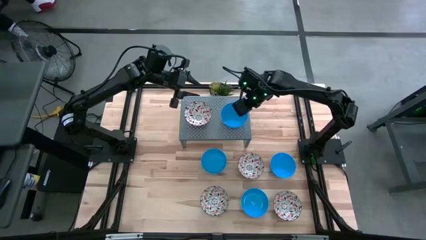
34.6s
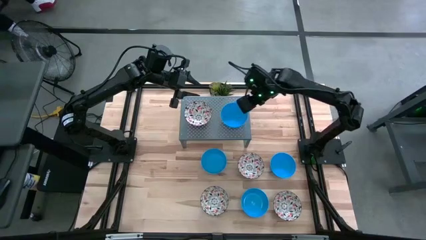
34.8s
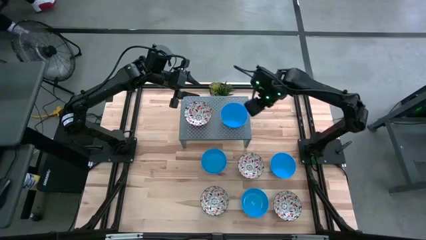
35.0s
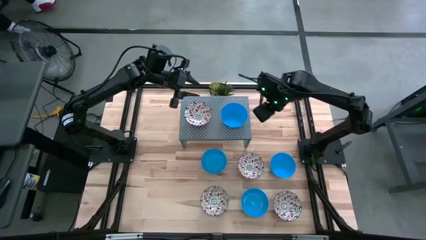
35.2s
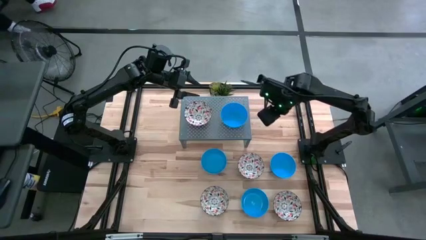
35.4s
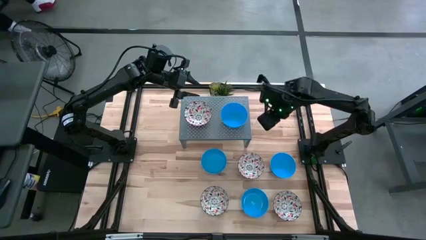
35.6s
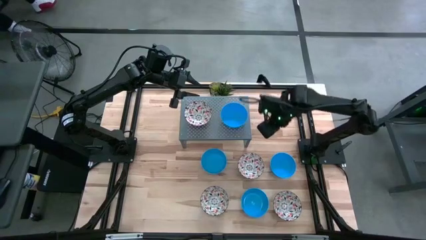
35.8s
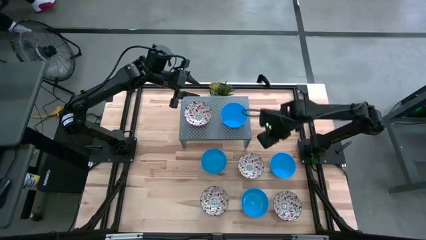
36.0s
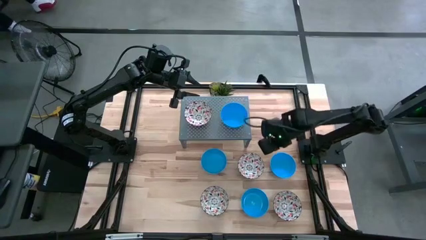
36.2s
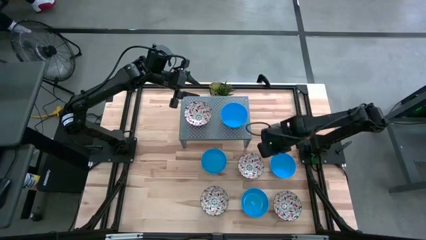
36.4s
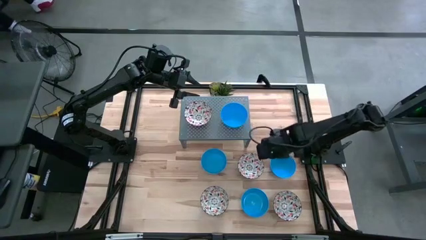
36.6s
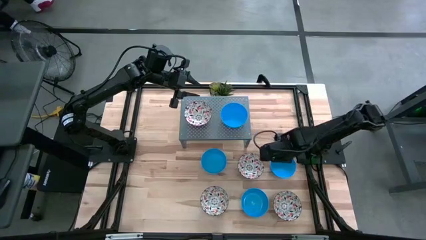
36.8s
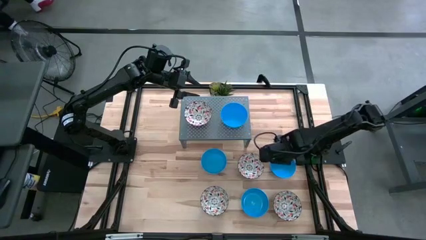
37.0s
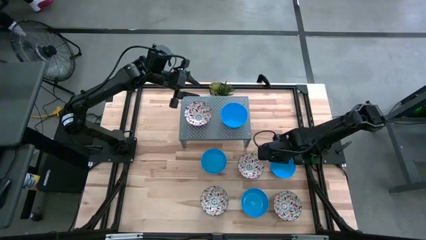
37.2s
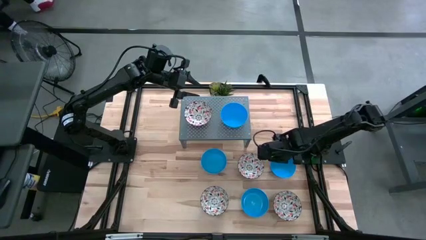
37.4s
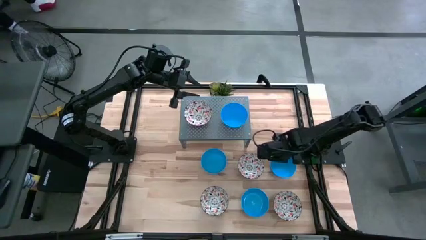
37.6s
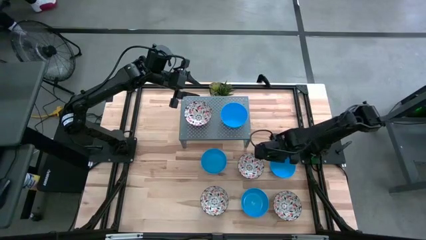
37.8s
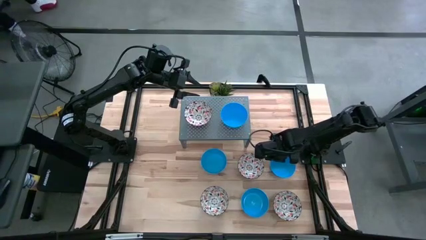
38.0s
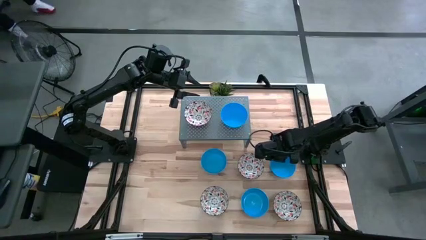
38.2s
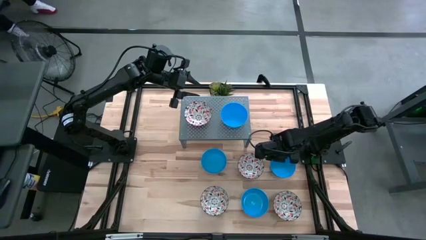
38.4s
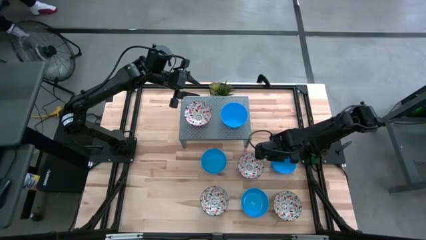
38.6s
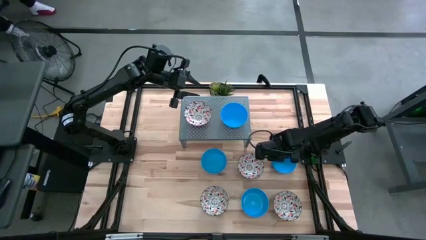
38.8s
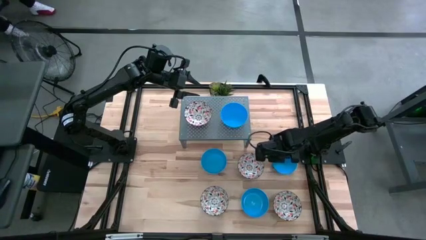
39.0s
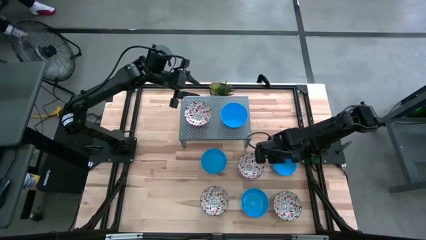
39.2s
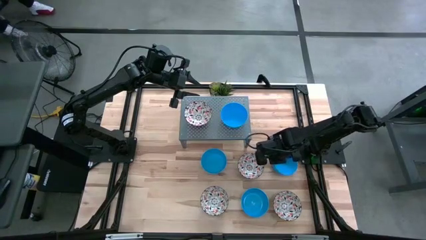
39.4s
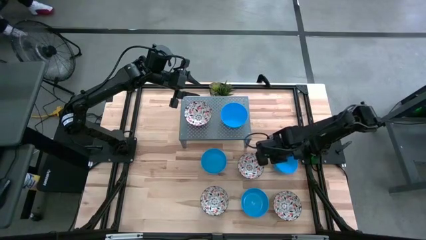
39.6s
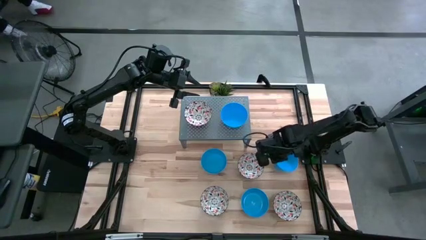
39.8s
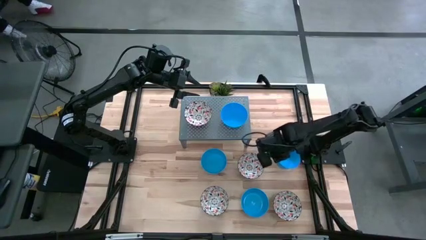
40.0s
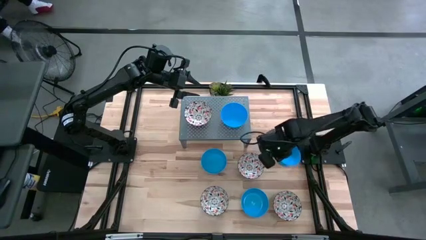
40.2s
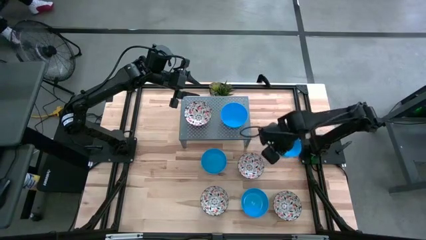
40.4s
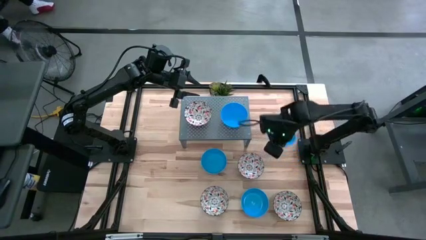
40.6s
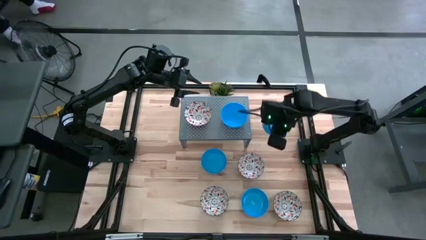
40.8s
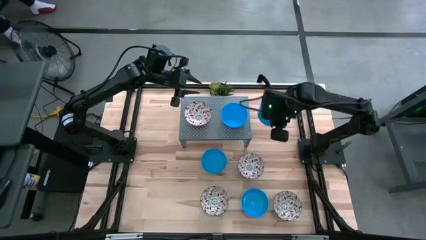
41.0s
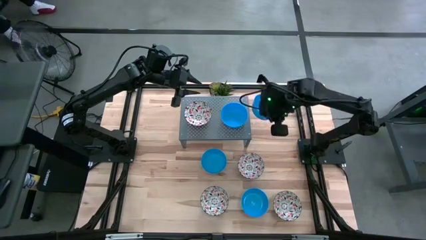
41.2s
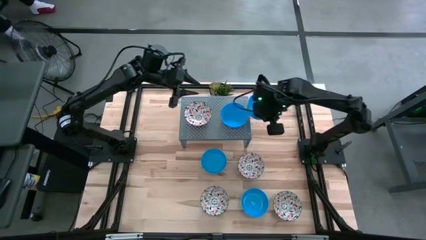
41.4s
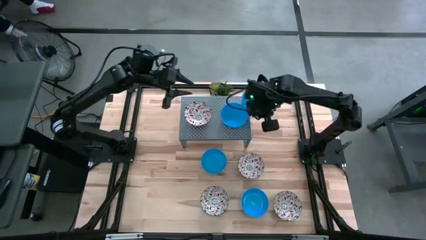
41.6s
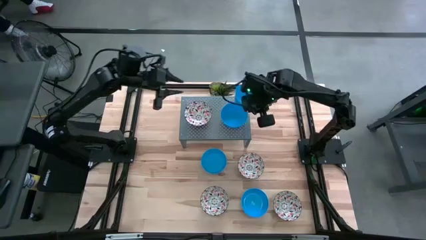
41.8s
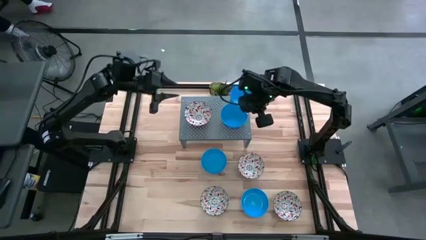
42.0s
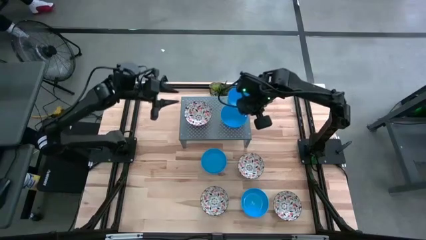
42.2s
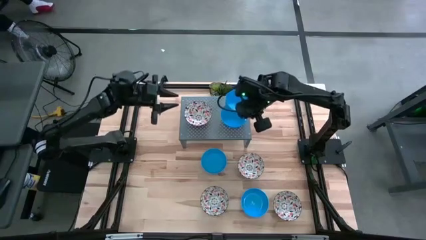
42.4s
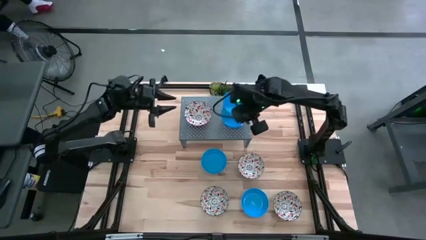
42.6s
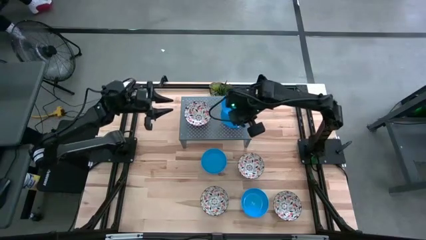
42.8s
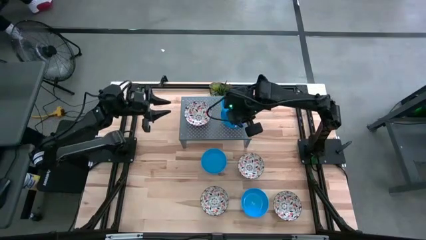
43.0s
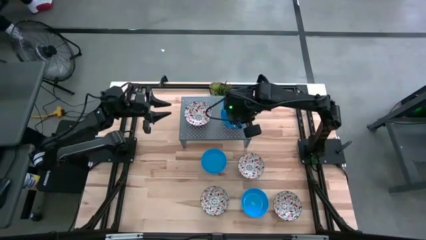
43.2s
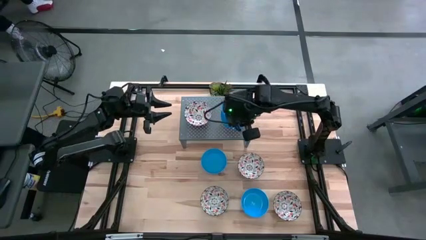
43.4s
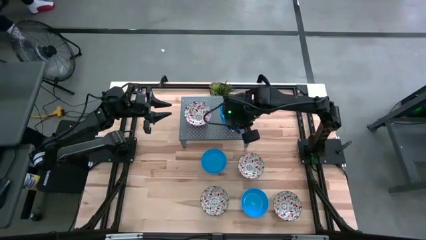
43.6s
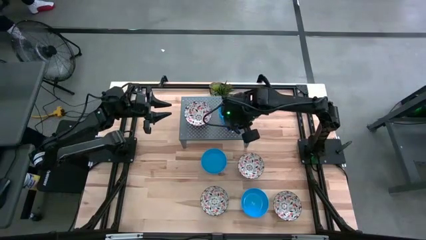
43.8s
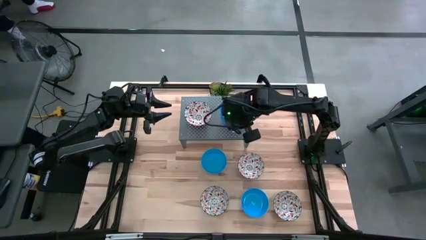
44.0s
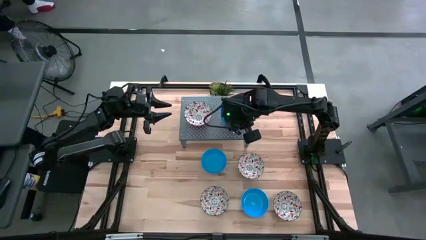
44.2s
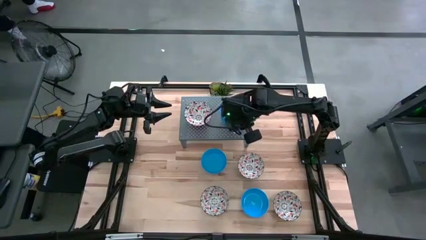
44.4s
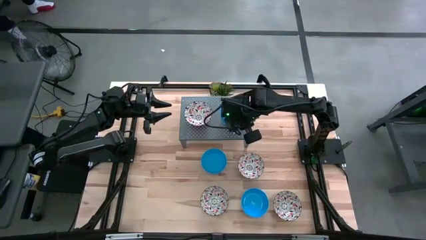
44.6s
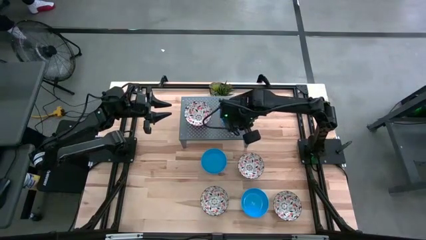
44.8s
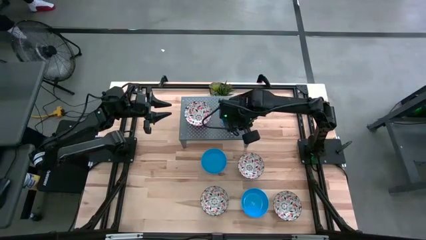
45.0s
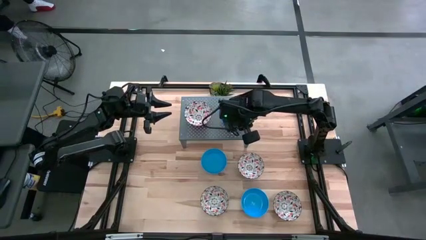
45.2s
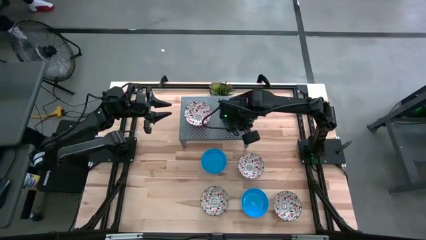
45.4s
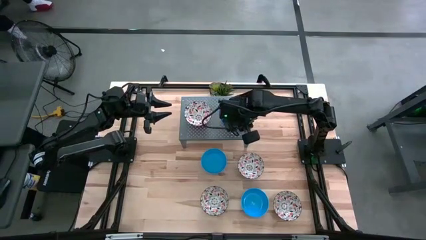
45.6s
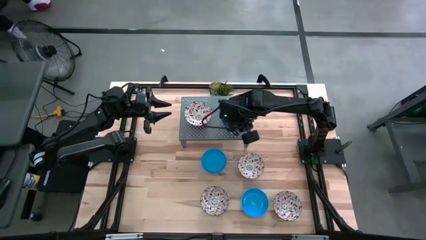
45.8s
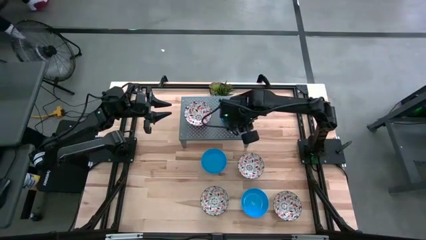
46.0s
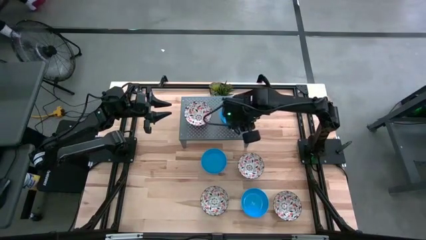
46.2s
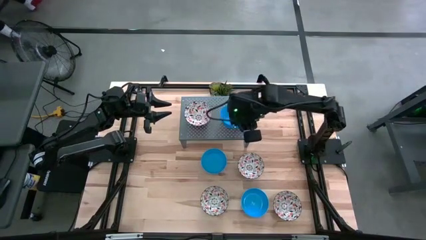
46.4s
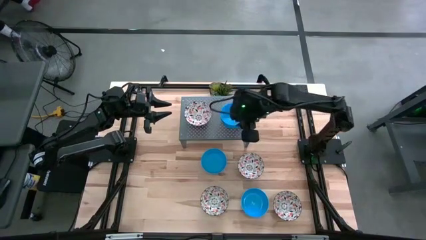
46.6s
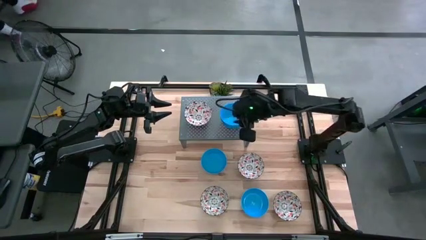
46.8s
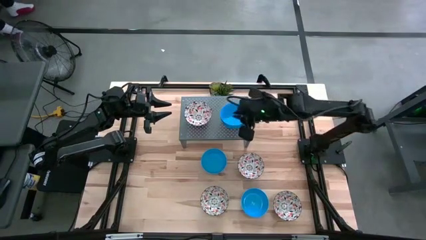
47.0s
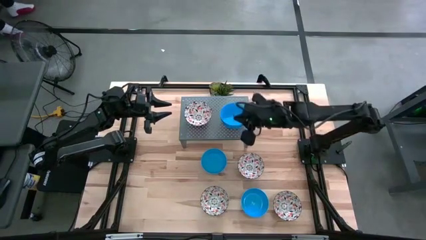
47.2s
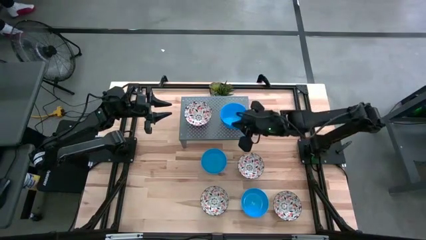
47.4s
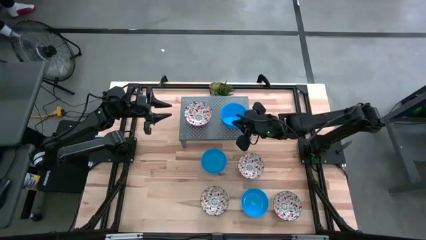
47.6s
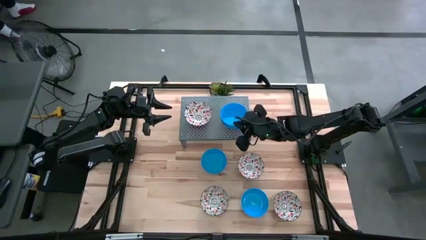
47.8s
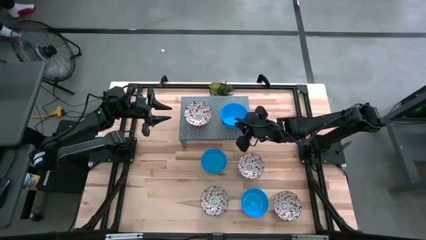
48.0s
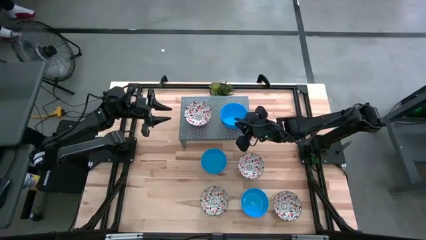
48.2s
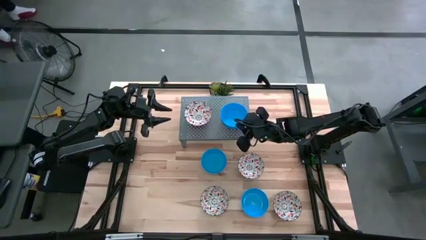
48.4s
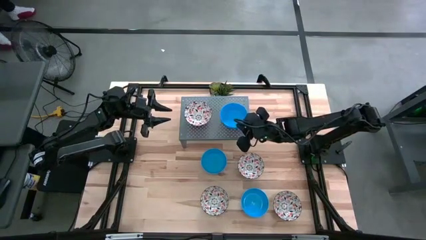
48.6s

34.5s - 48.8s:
Task: Pick & Place Mini bowls
Stack the blue bowl on the blue bowl on the shelf
